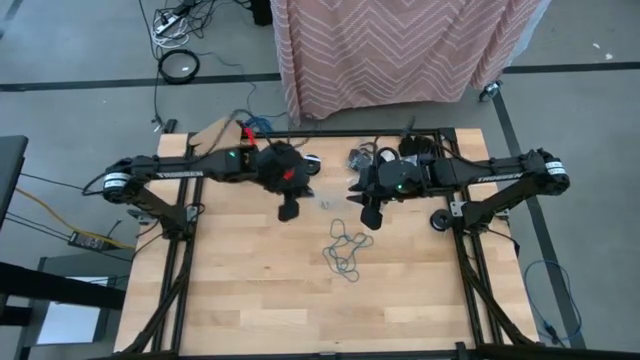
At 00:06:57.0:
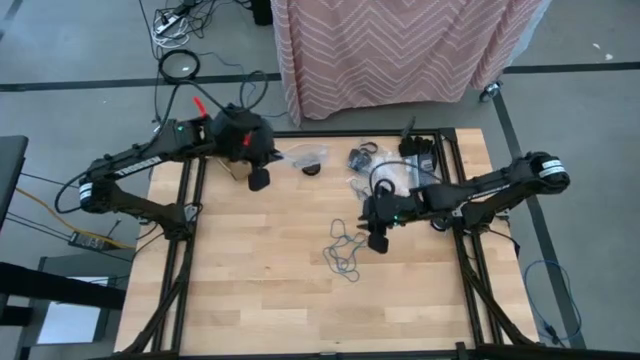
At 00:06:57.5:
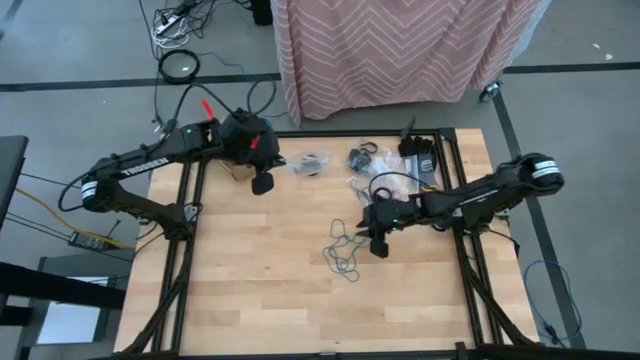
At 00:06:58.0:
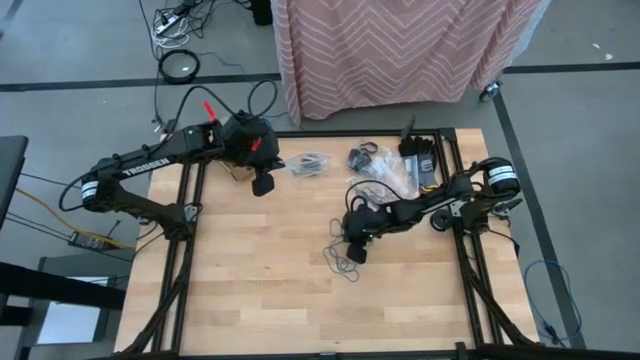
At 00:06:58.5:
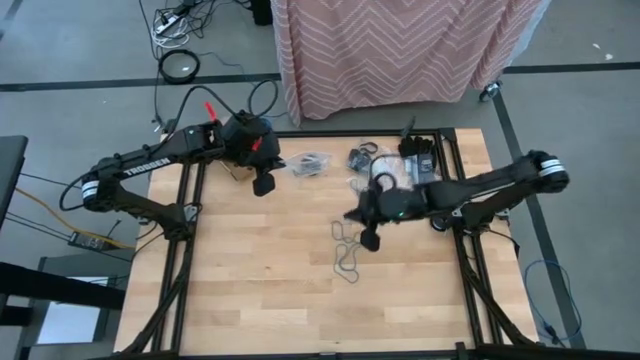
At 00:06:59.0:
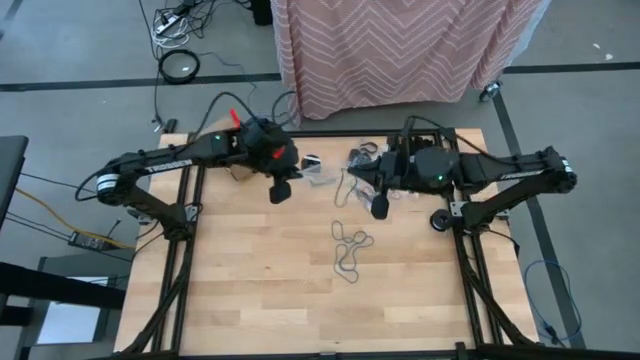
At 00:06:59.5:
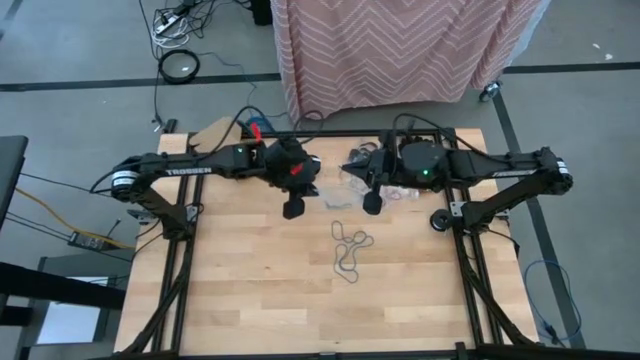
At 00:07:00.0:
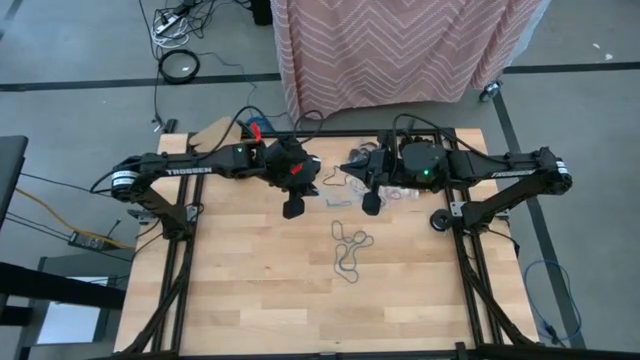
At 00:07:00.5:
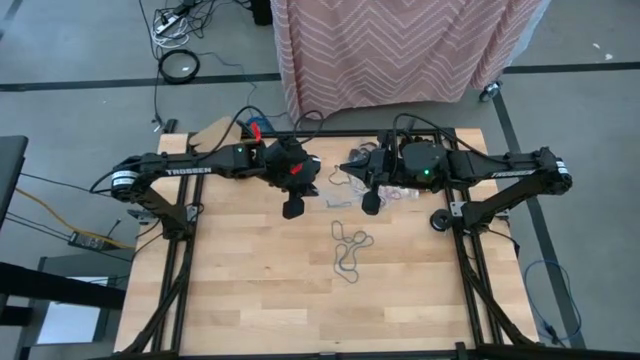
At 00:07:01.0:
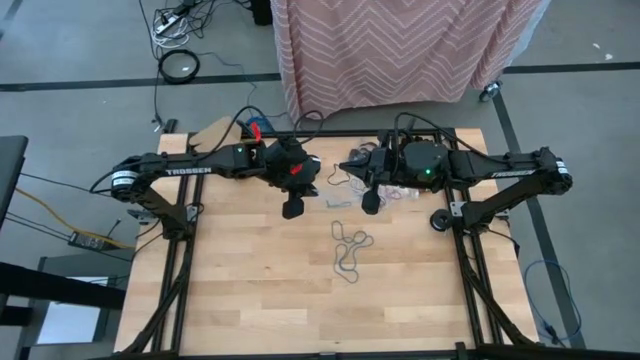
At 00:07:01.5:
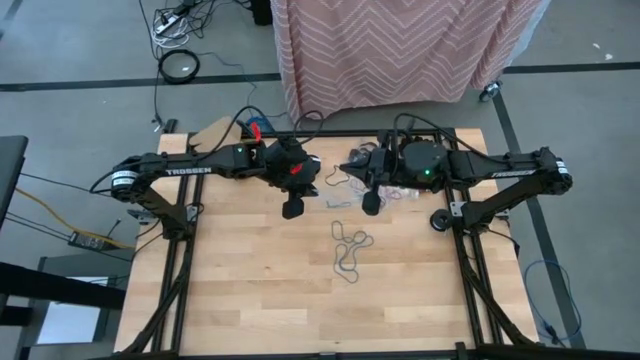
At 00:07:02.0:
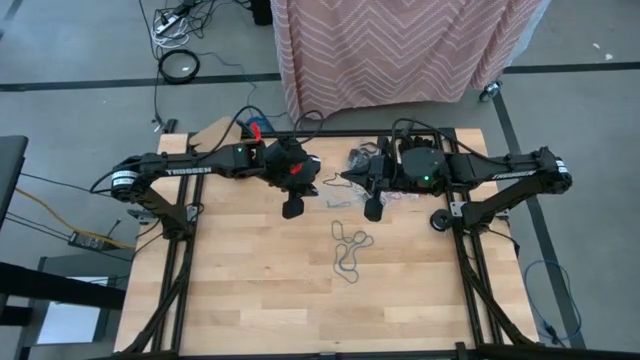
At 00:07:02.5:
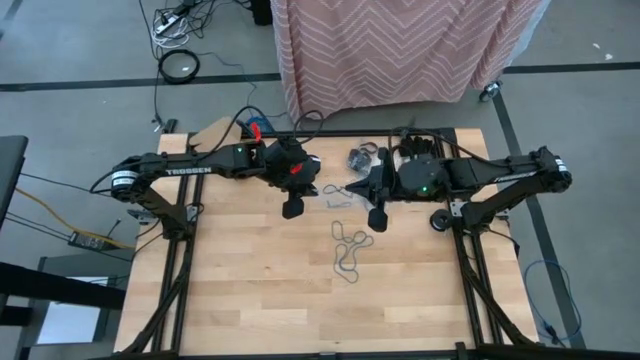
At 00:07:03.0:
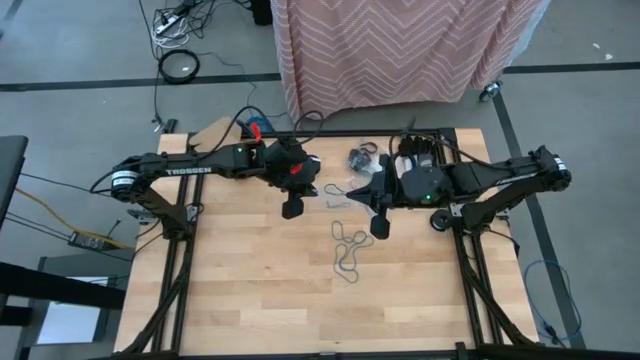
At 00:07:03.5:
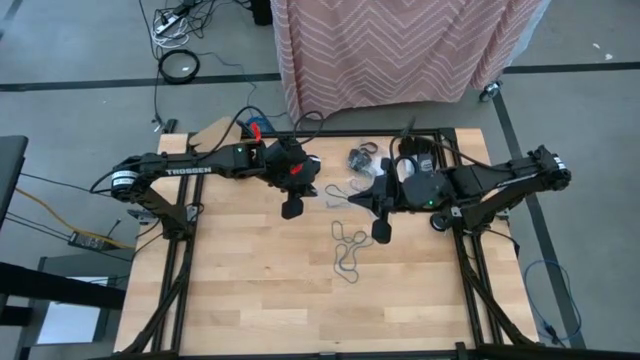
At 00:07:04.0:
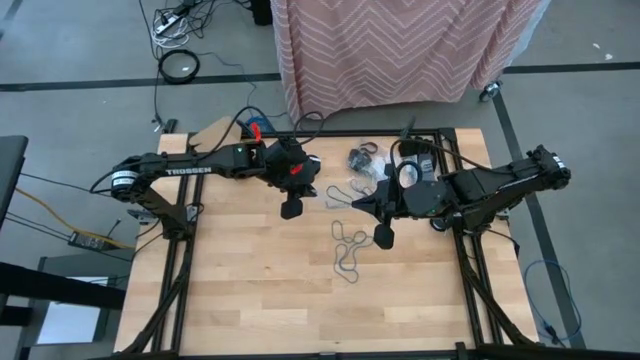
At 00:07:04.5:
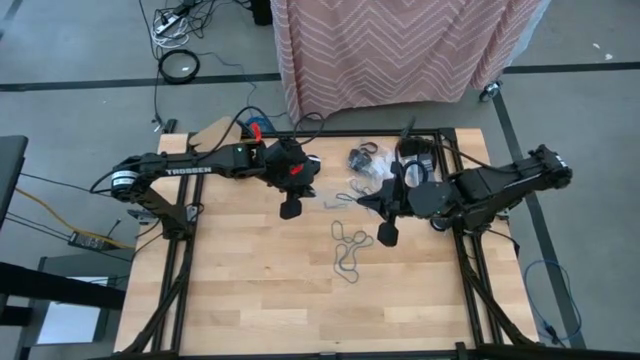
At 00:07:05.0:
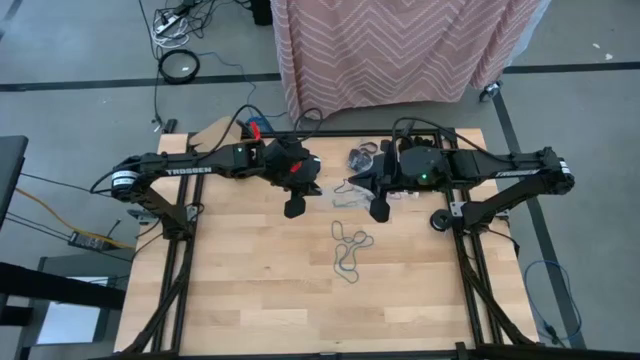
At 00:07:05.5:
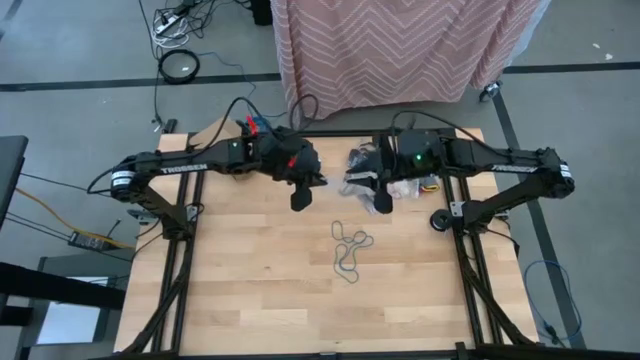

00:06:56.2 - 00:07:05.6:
Task: Sort rubber bands
Put the blue rubber band into the transparent zip bag

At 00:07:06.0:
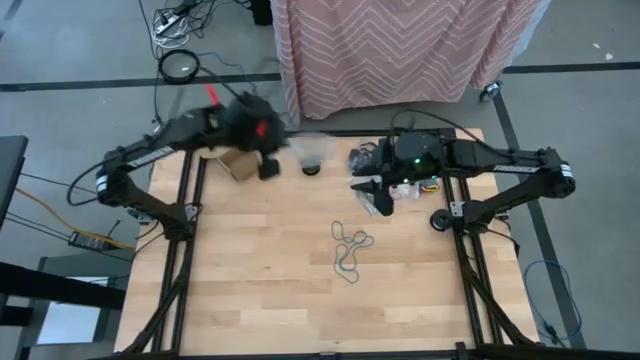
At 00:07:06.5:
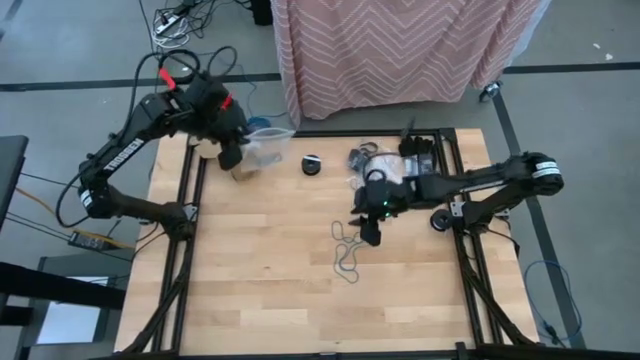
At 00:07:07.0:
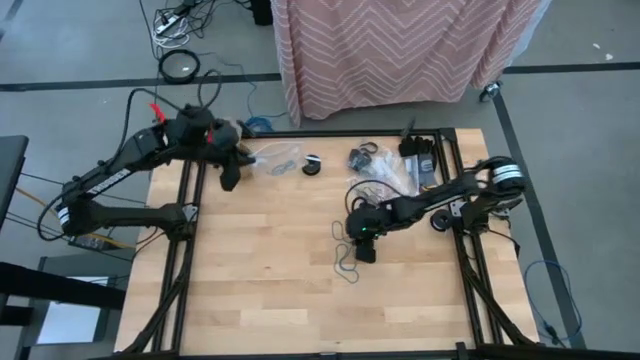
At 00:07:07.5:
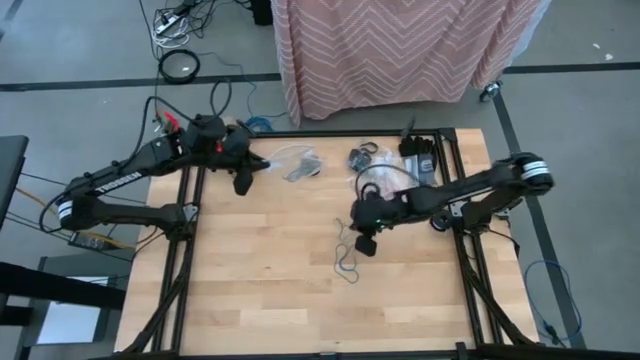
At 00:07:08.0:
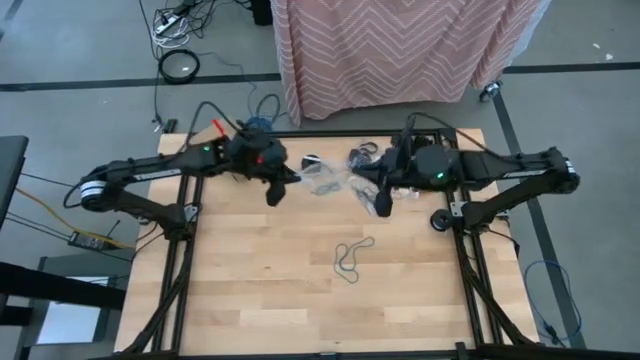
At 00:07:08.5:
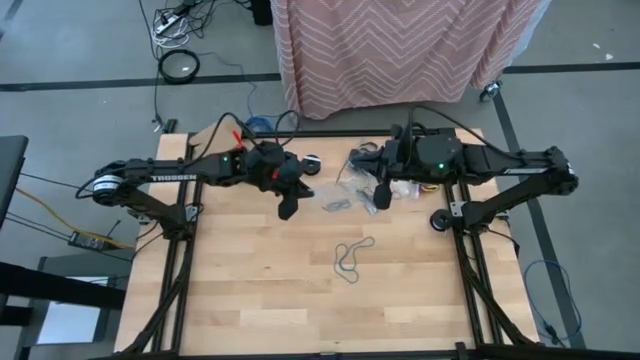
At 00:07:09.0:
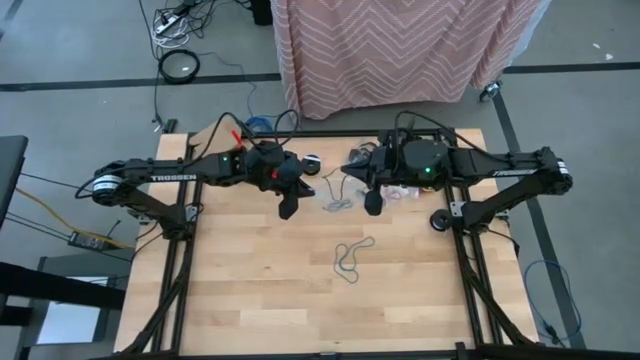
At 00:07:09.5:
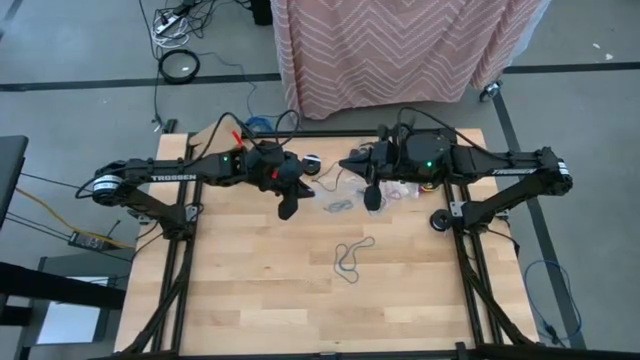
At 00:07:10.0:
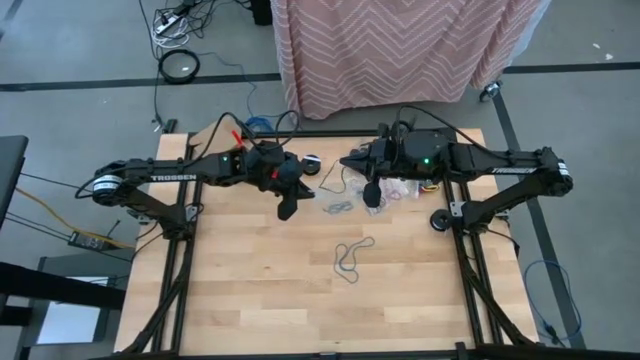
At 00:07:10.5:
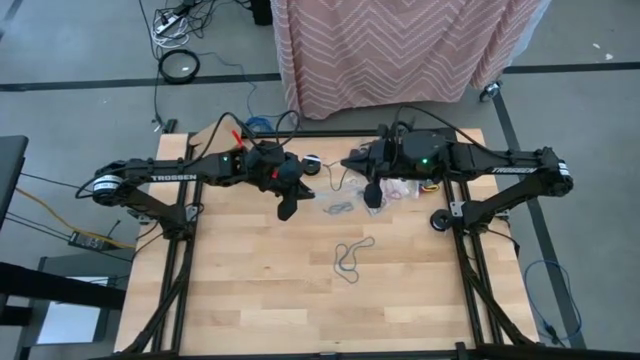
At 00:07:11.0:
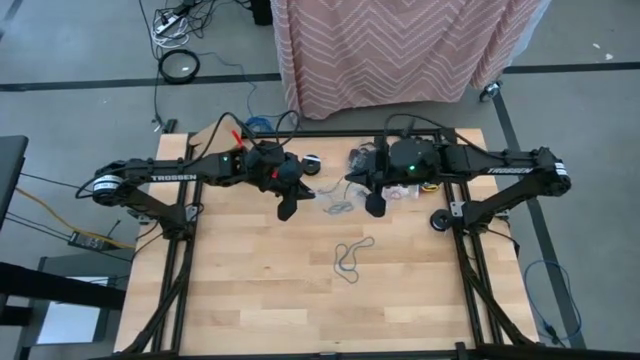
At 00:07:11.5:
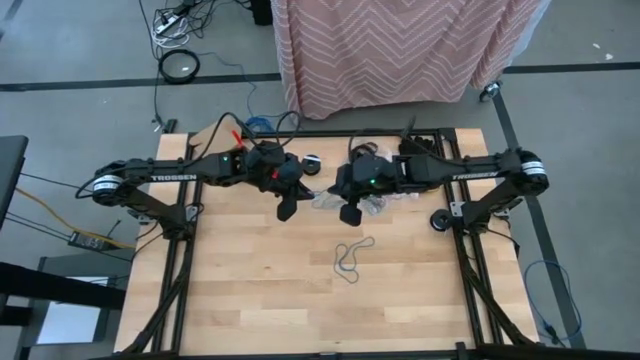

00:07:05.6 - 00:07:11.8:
Put the blue rubber band into the transparent zip bag

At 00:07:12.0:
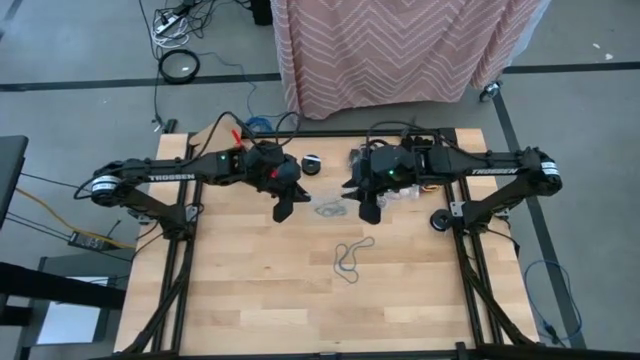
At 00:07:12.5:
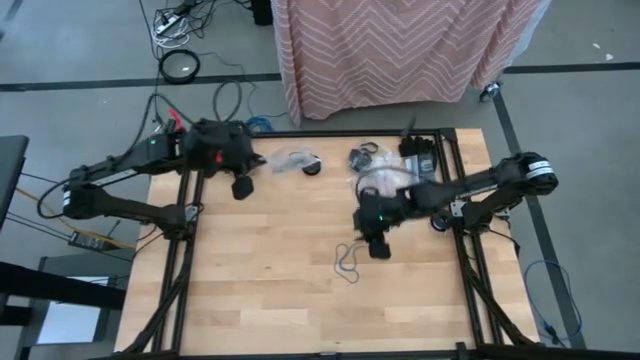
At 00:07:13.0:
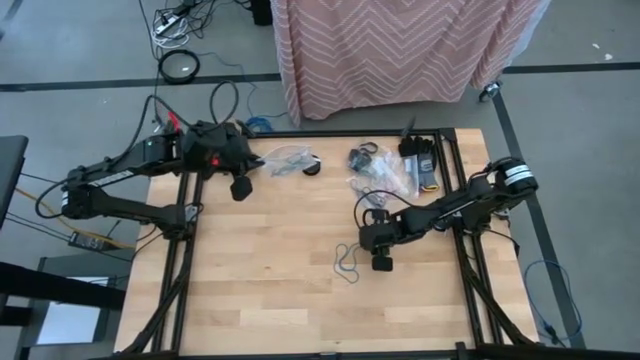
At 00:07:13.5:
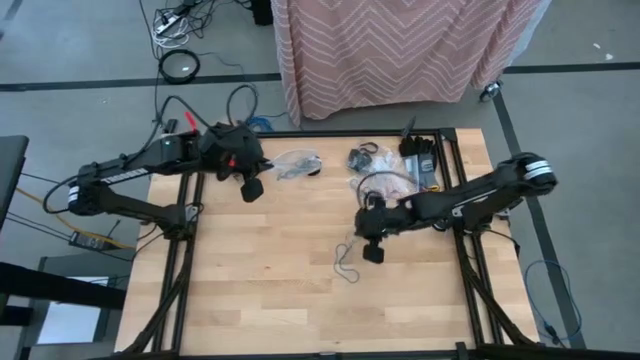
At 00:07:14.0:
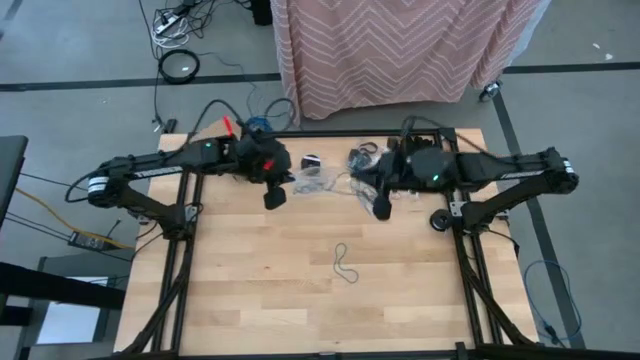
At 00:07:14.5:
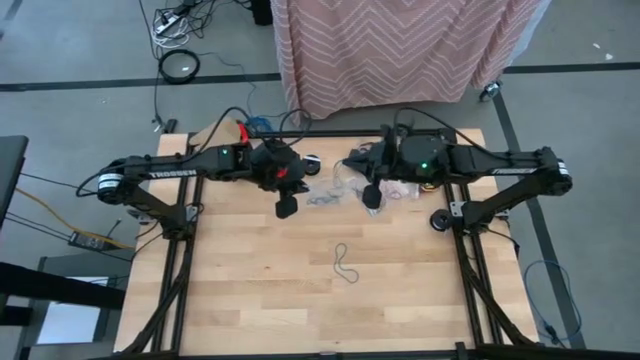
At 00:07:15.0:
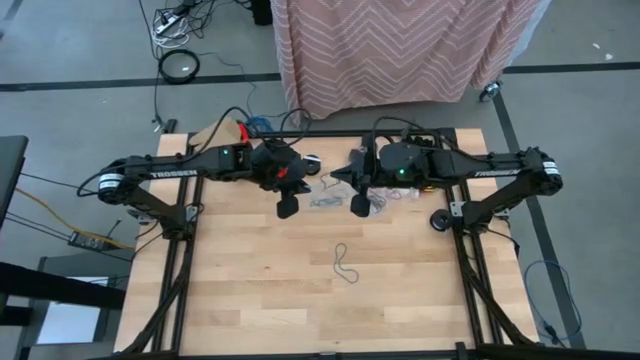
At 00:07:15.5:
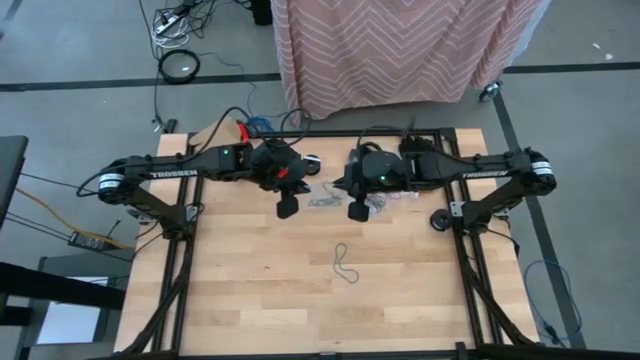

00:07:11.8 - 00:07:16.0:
Put the blue rubber band into the transparent zip bag

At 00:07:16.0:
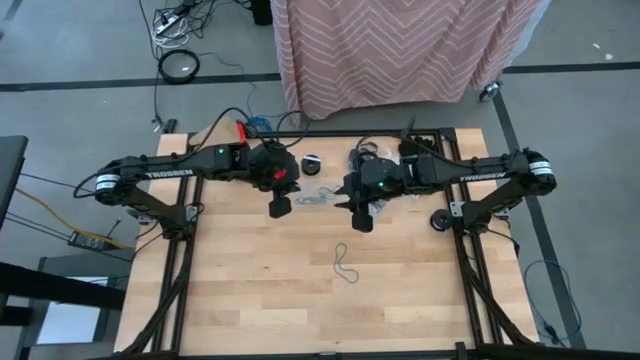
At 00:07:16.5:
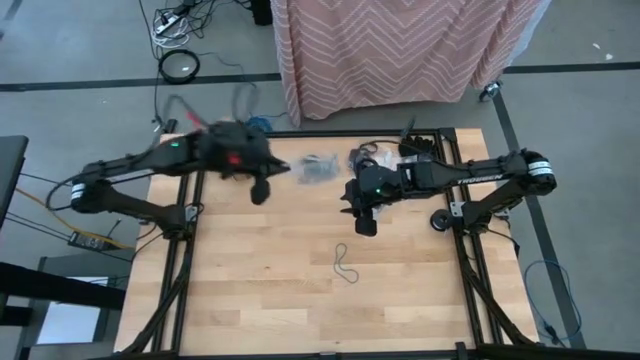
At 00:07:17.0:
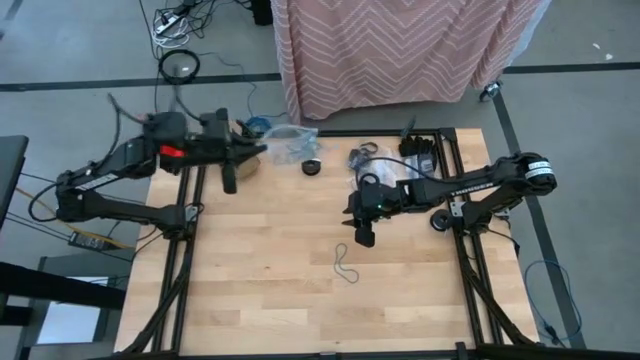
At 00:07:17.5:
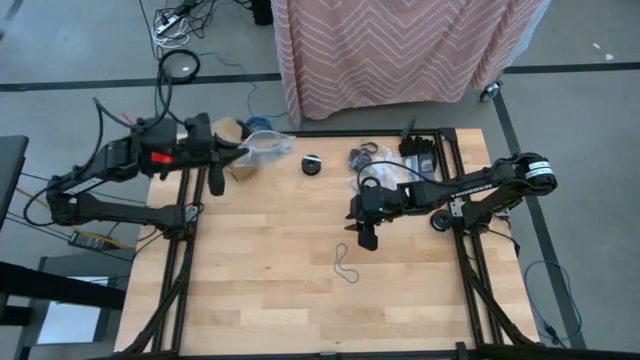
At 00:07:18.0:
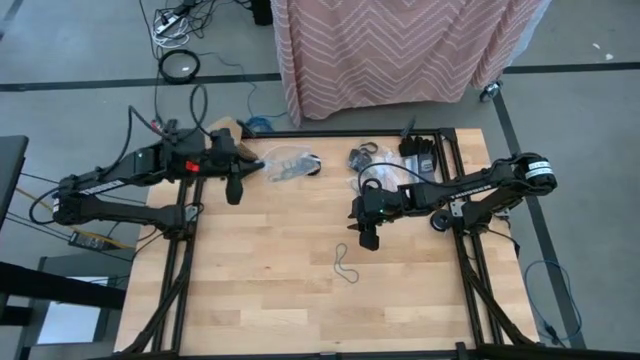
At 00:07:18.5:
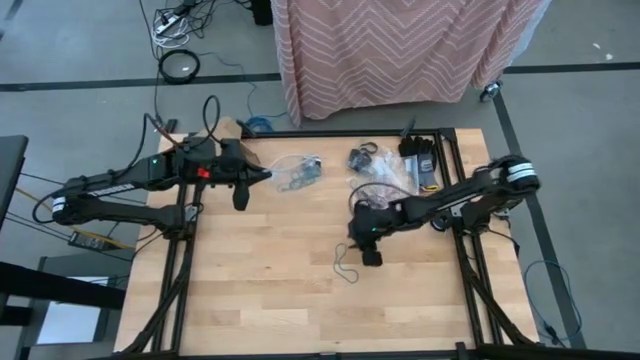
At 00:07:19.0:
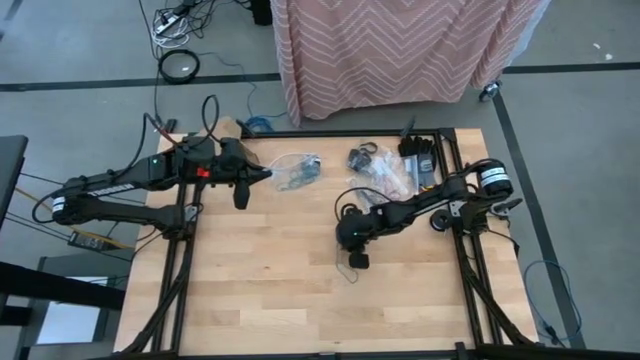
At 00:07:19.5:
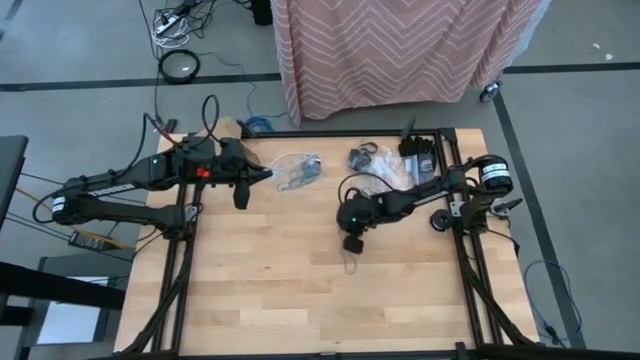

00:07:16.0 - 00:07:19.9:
Put the blue rubber band into the transparent zip bag
